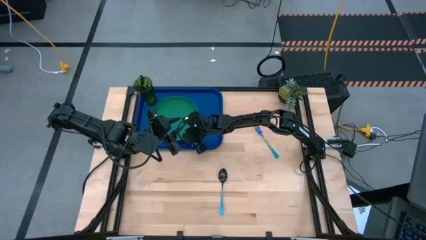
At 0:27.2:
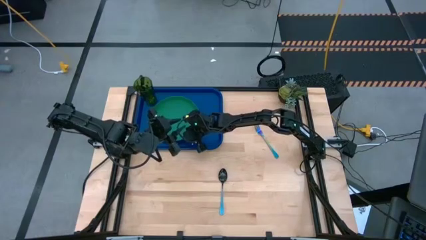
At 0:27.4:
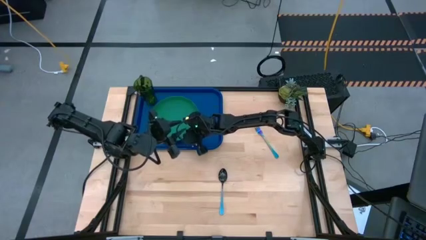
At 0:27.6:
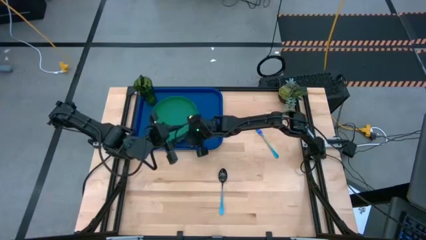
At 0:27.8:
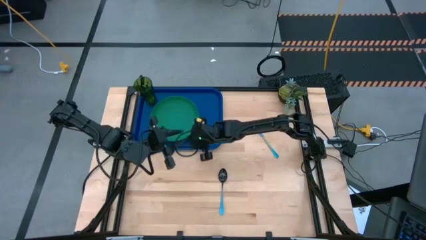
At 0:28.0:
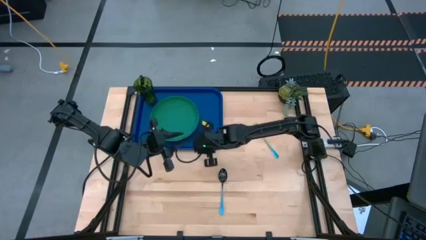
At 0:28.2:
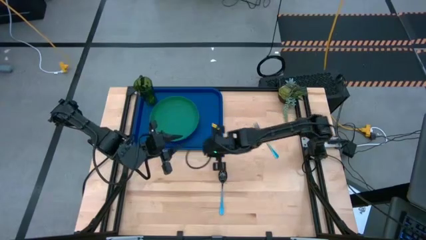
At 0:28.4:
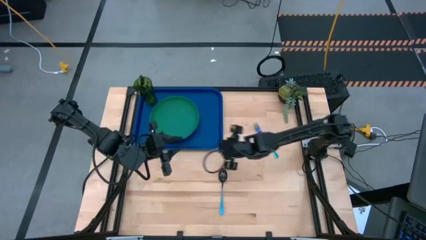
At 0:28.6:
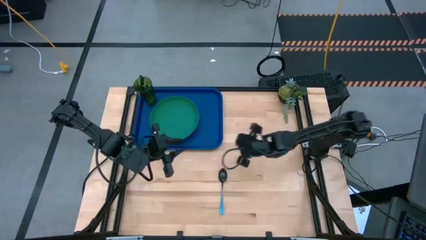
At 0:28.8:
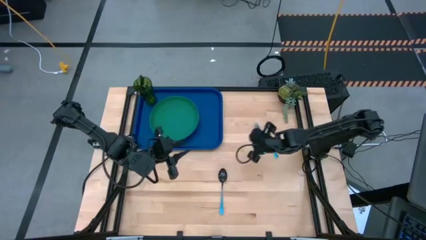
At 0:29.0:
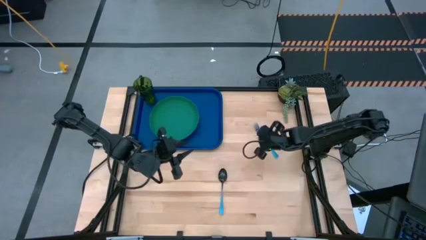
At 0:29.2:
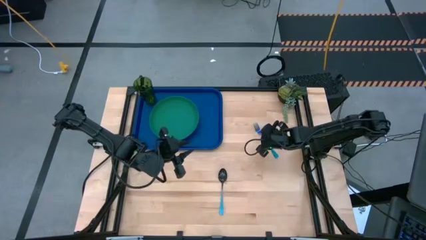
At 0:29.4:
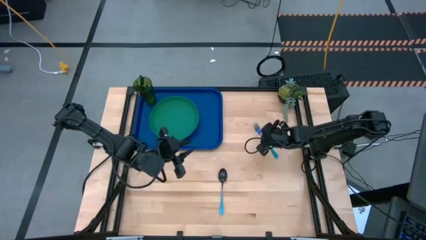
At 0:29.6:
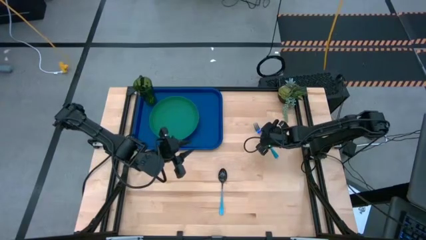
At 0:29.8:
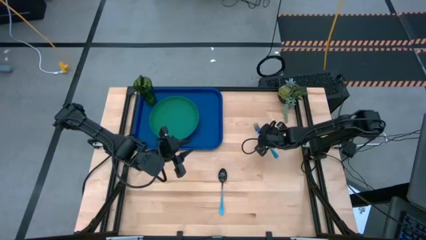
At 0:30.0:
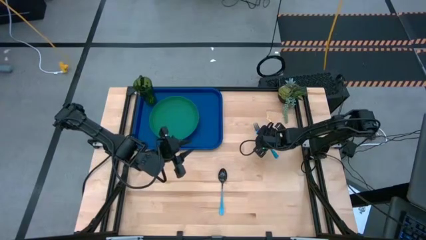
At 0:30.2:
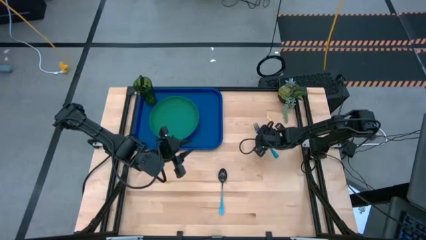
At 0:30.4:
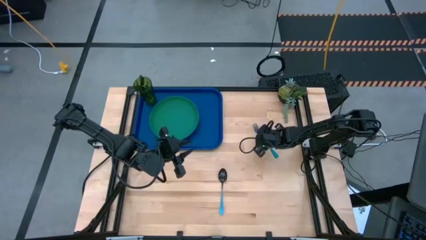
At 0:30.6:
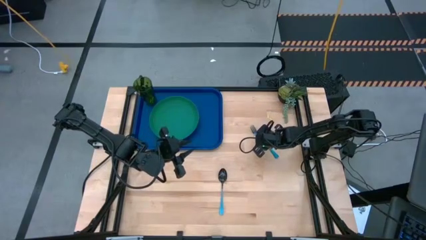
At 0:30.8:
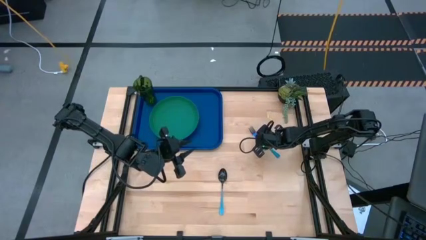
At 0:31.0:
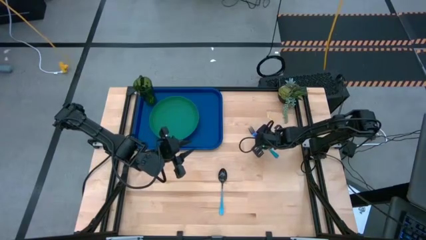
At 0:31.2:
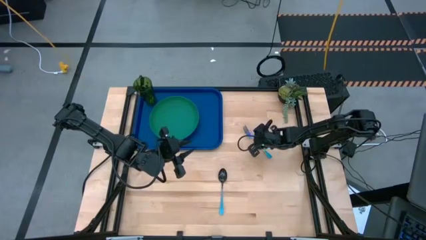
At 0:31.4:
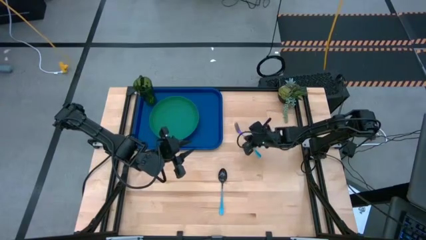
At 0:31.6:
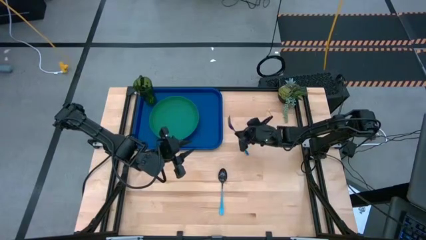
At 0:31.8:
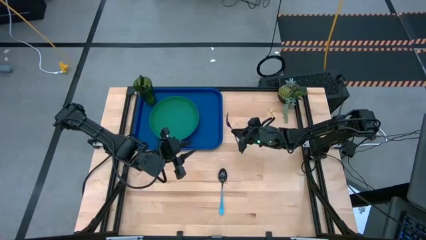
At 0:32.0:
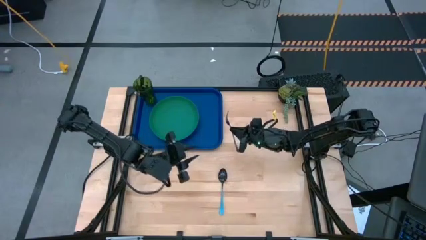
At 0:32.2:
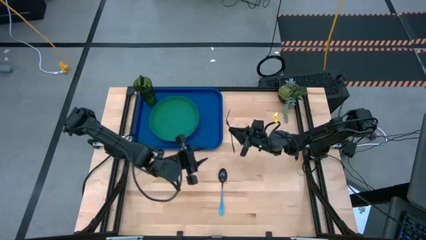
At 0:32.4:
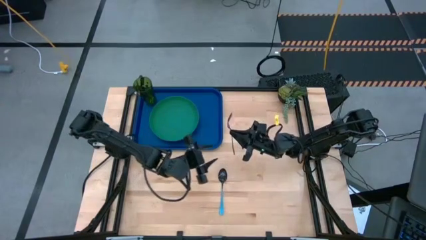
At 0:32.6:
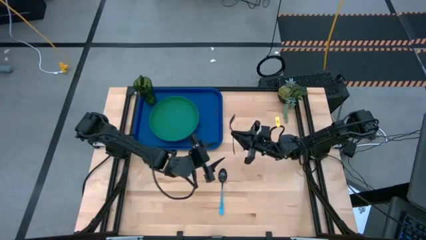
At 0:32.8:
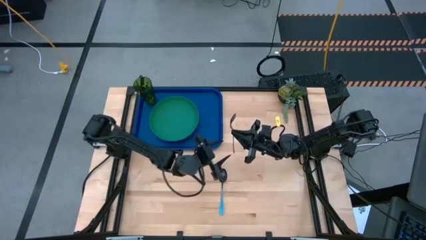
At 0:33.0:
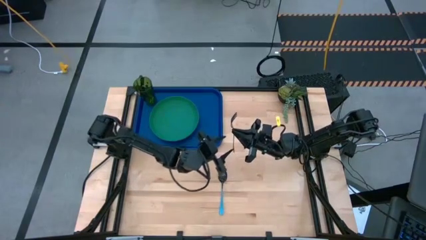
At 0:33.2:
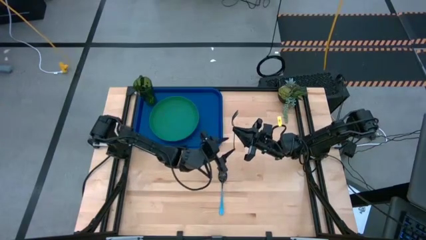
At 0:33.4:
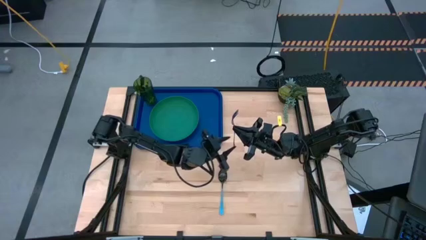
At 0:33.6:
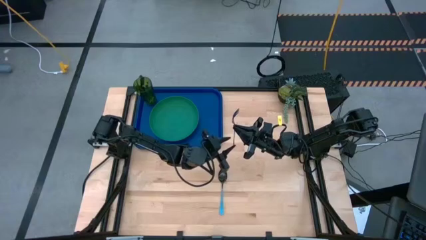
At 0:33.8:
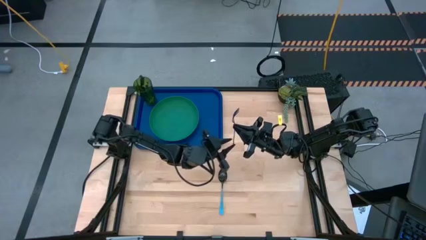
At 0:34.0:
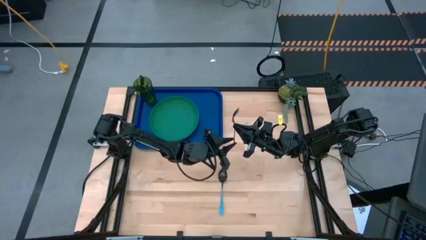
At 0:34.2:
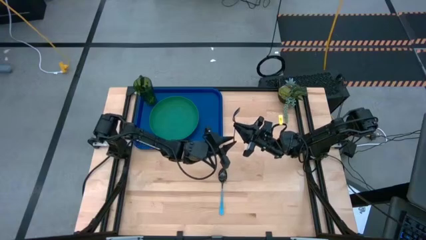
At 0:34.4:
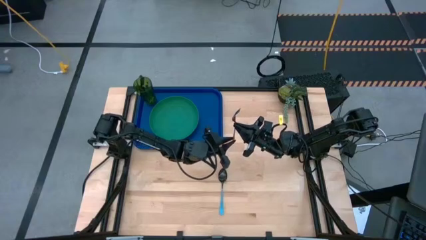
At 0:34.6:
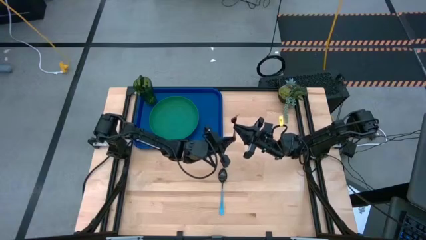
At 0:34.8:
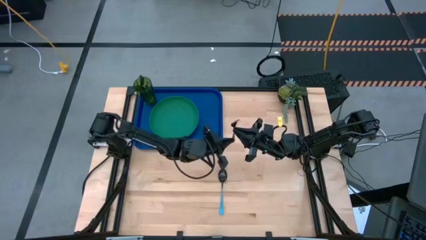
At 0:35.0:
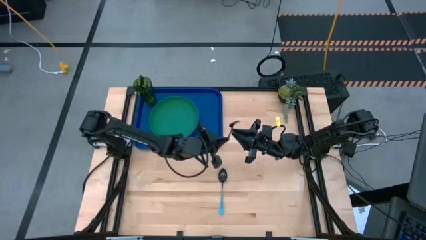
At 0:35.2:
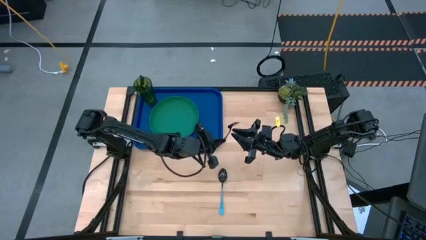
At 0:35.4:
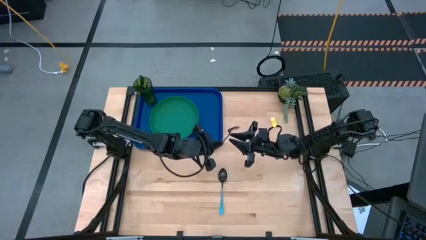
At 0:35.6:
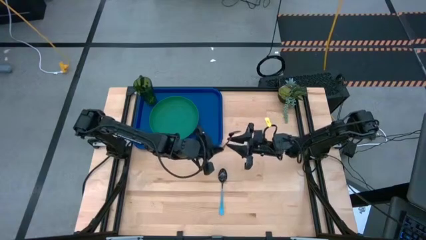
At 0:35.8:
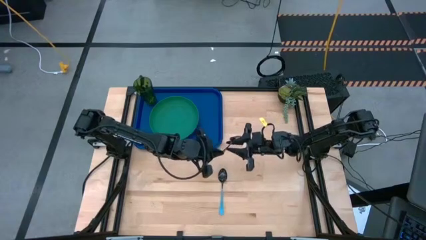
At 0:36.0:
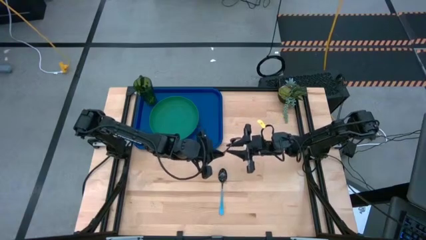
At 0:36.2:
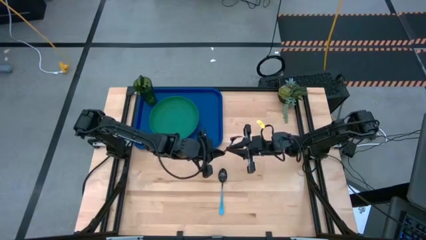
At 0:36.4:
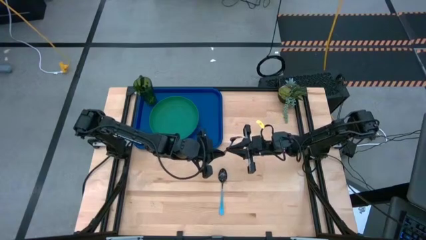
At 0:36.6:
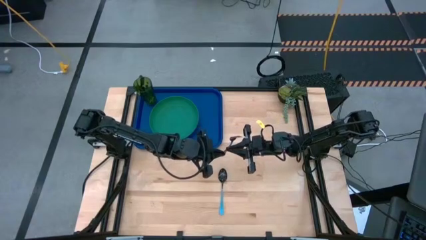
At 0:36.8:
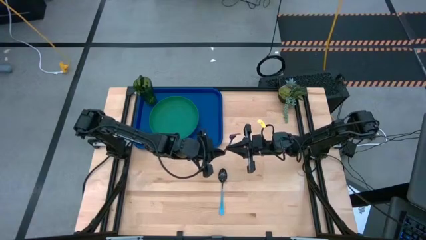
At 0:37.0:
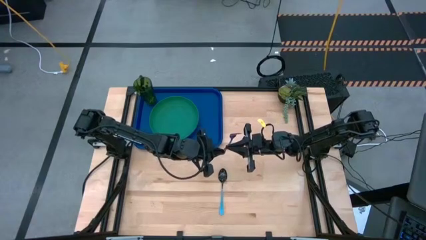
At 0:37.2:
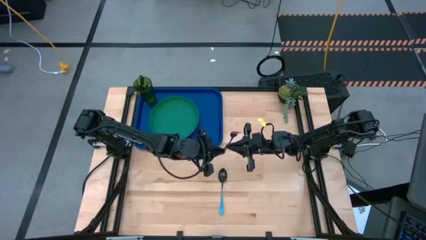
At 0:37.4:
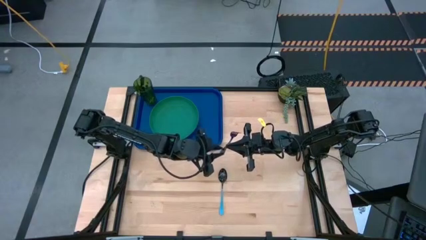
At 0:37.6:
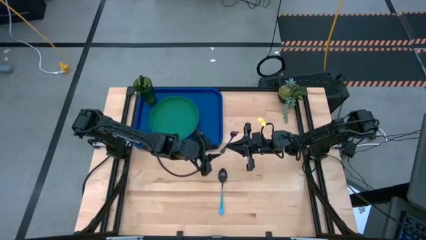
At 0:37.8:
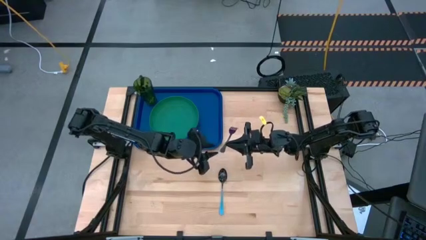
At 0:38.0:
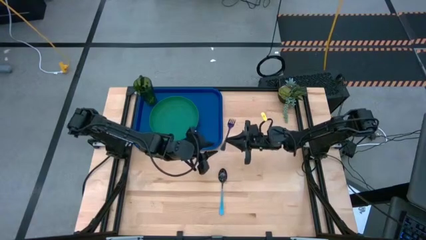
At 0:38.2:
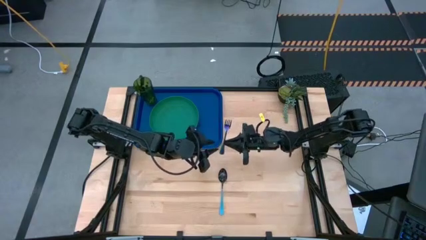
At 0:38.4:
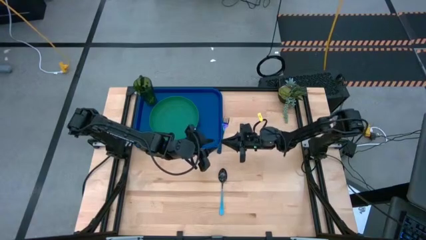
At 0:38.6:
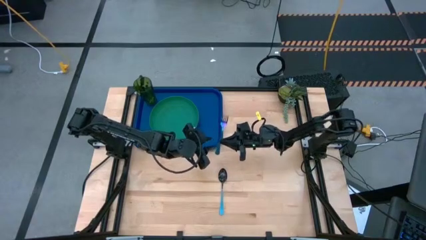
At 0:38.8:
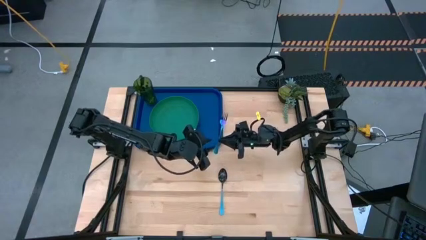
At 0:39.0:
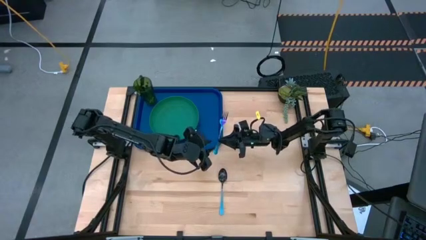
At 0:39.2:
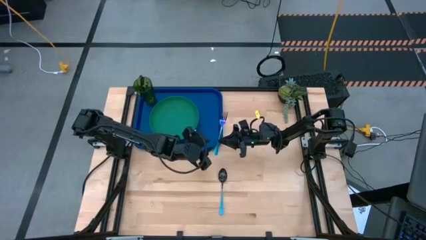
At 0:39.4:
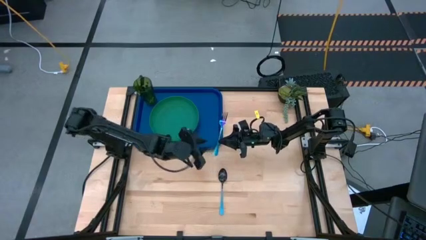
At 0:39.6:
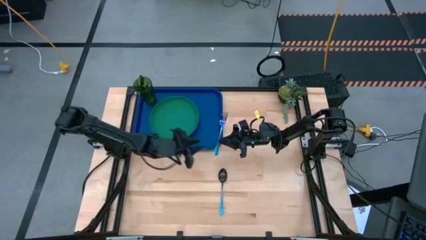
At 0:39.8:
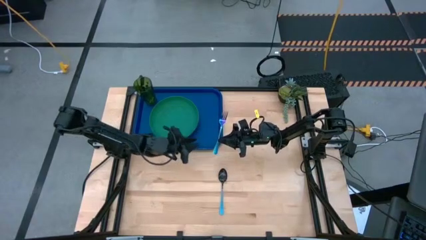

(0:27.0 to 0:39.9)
Task: Pick and place plate/cup/fork/spoon on tray
Put the iridescent fork on the blue tray
